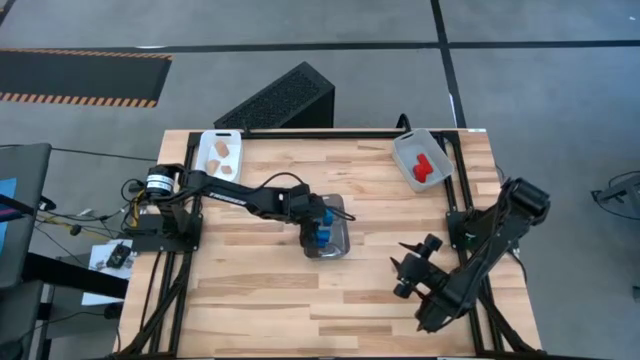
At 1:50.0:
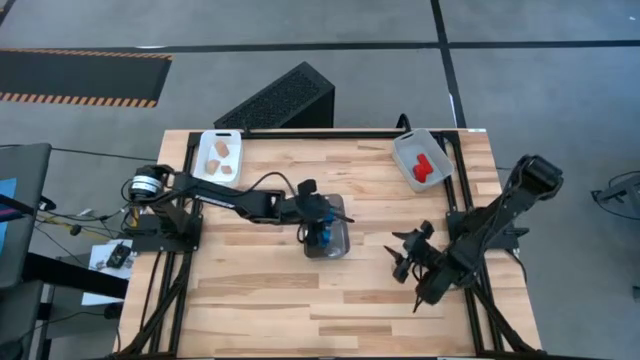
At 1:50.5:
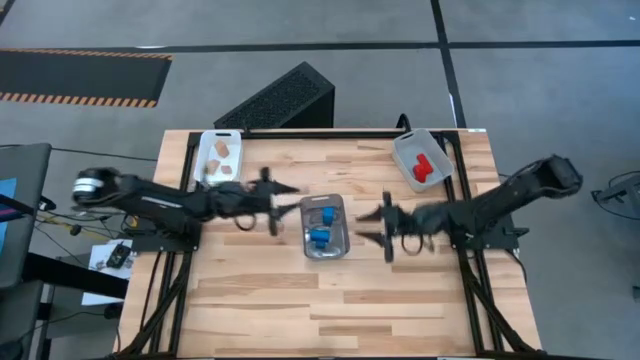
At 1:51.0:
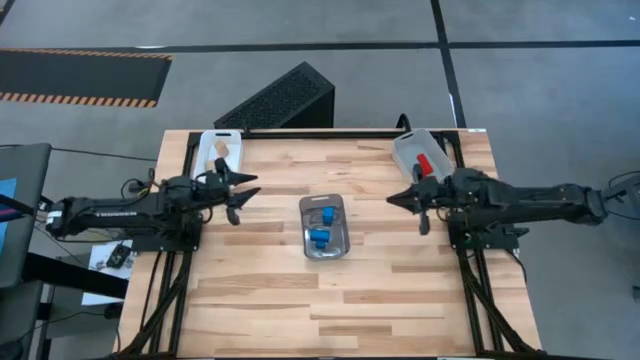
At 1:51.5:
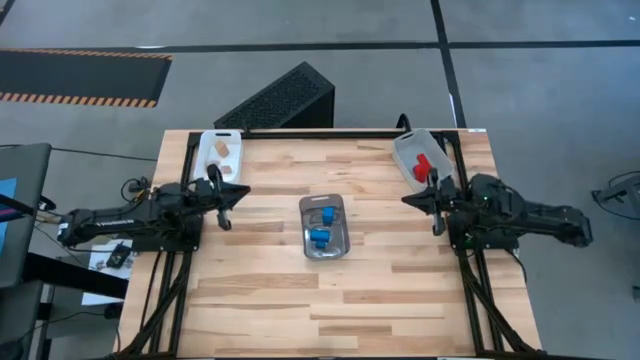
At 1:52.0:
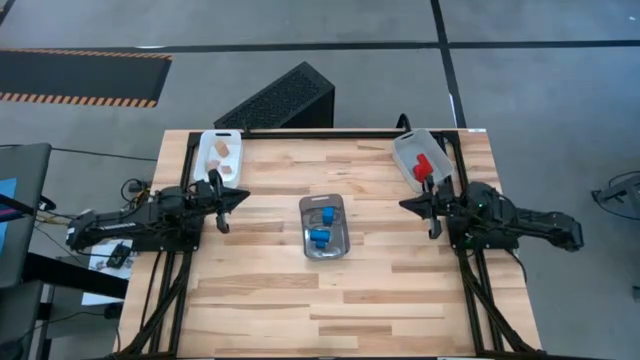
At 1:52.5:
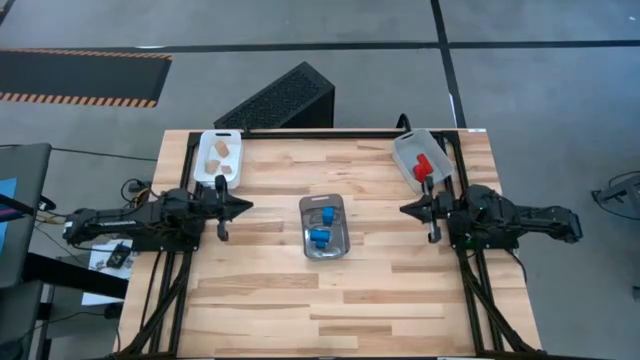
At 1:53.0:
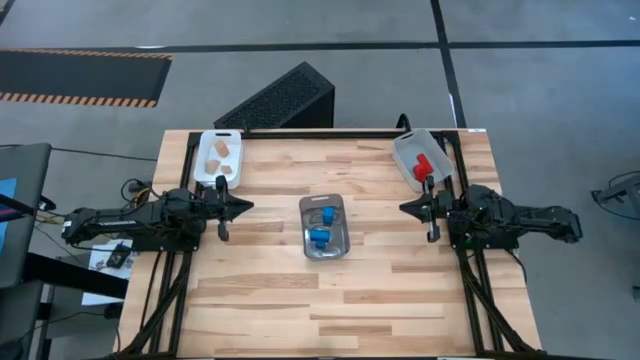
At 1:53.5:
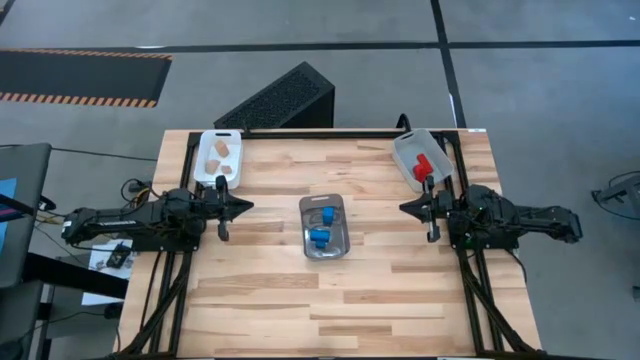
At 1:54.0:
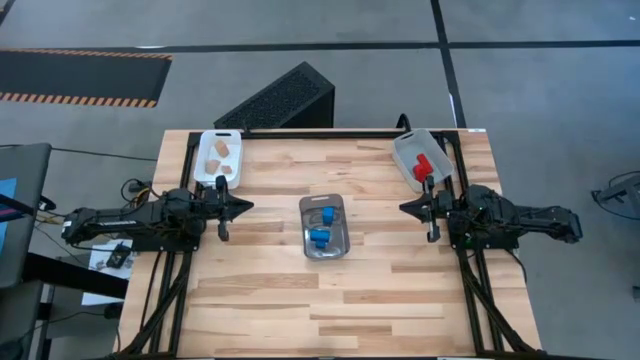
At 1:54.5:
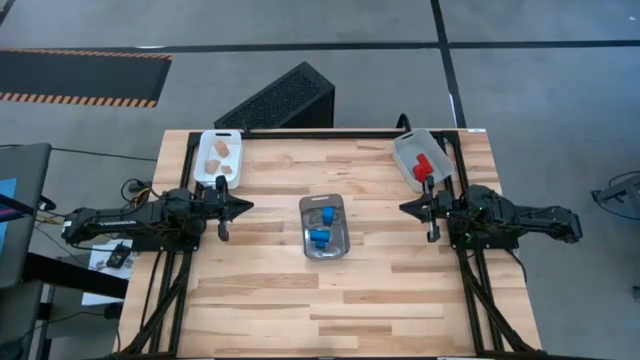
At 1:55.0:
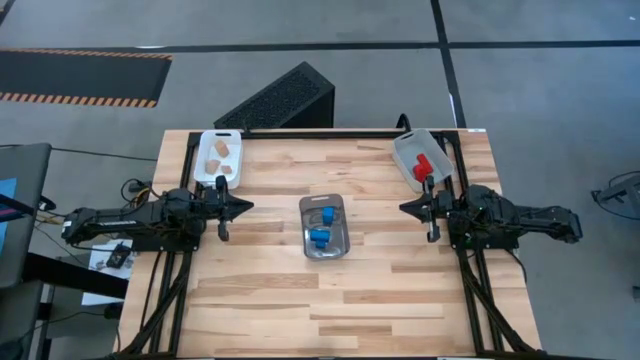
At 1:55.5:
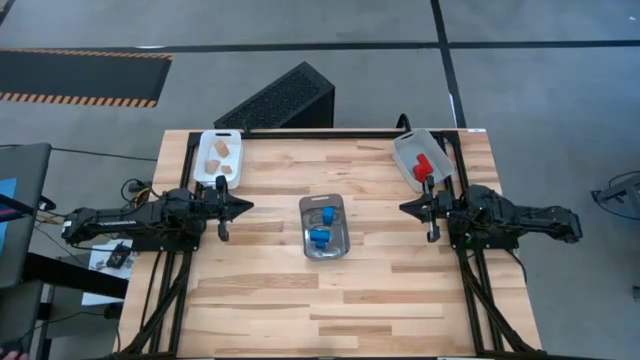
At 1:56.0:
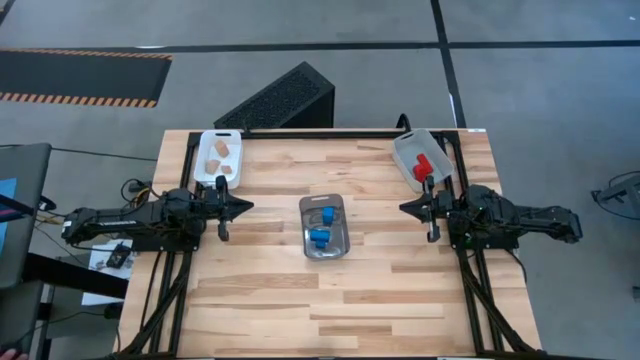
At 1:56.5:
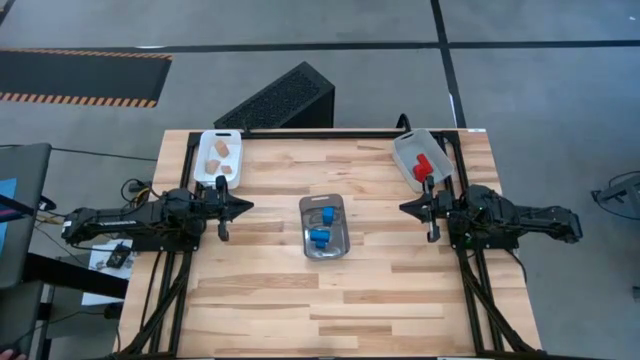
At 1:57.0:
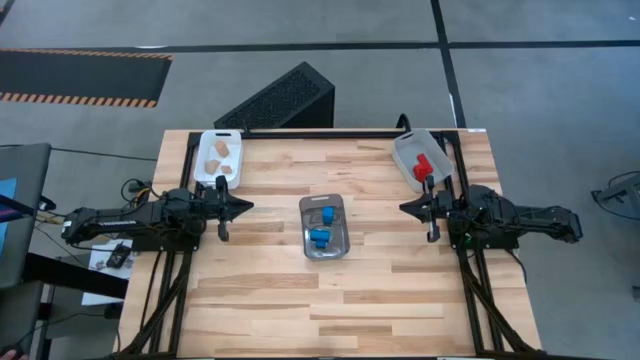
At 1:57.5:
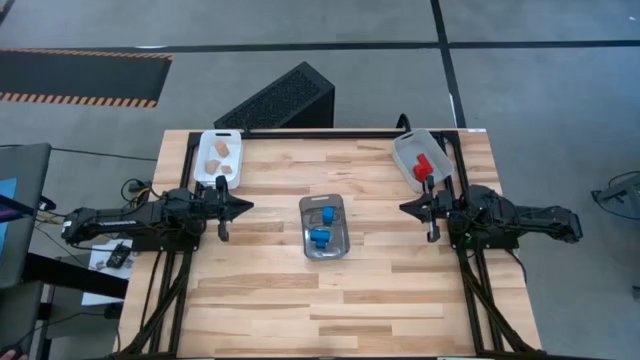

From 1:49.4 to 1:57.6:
Task: Sort & place blocks by color
Return to Home Position

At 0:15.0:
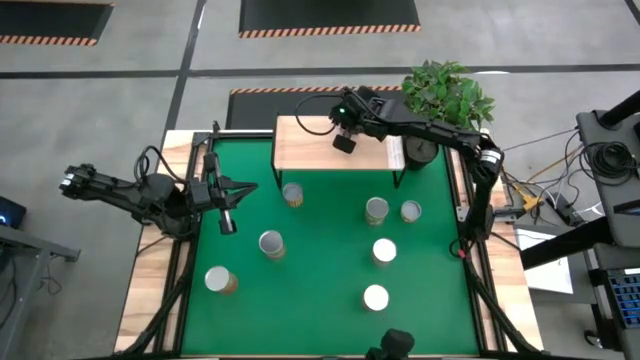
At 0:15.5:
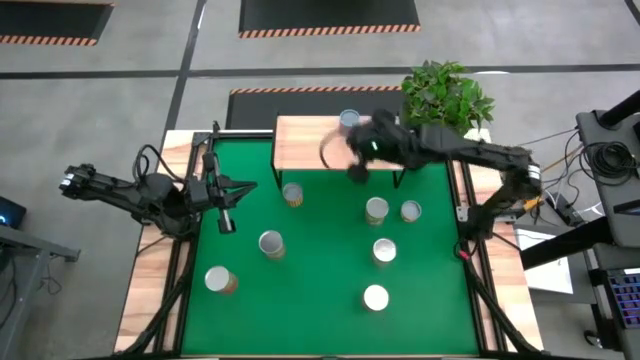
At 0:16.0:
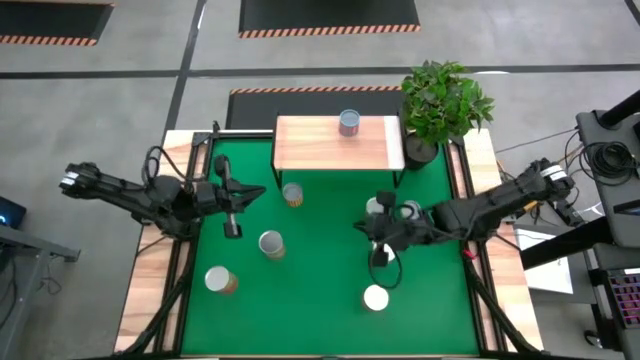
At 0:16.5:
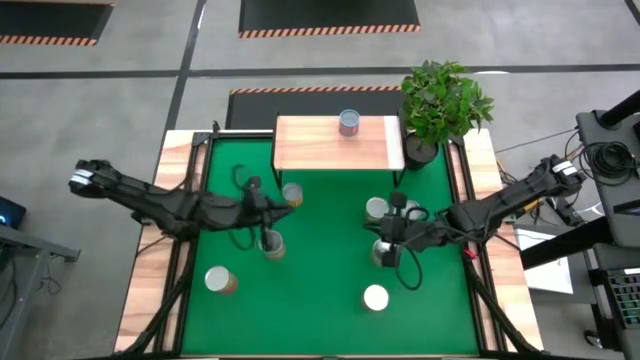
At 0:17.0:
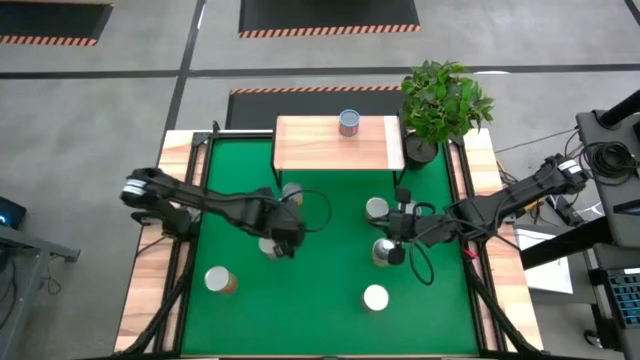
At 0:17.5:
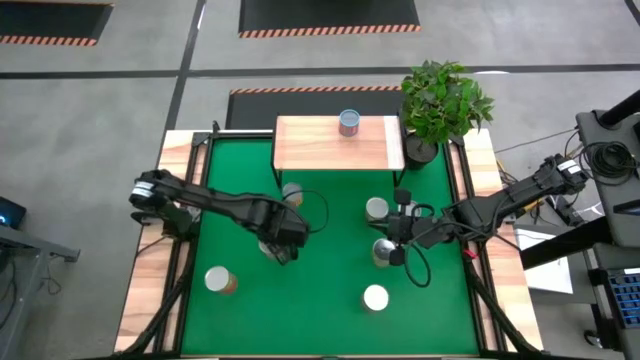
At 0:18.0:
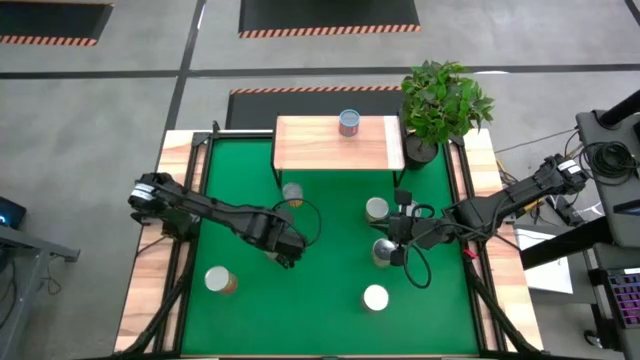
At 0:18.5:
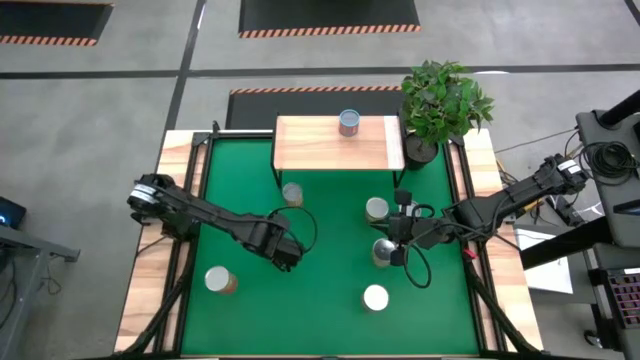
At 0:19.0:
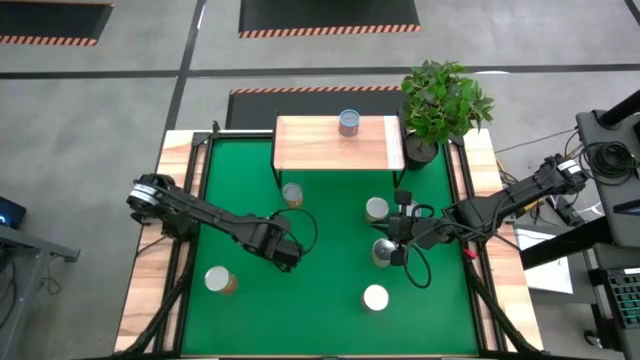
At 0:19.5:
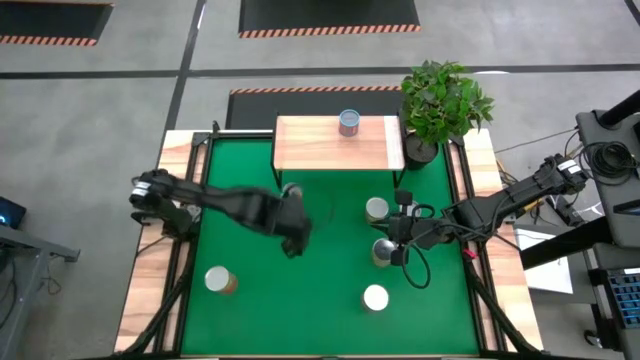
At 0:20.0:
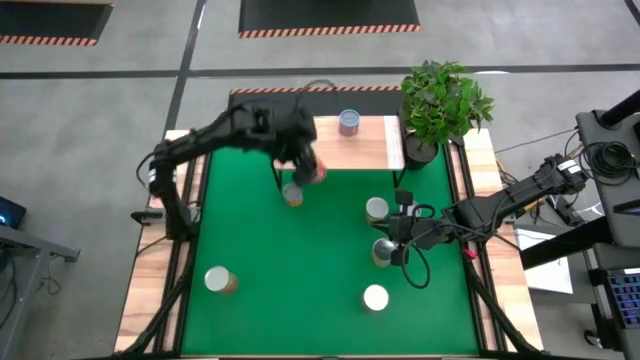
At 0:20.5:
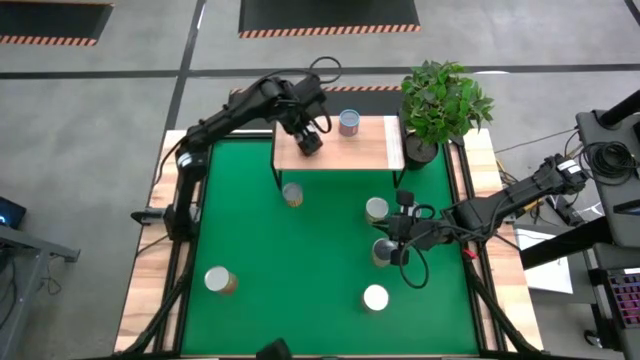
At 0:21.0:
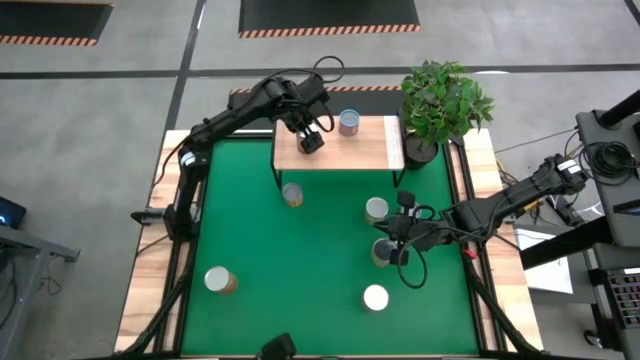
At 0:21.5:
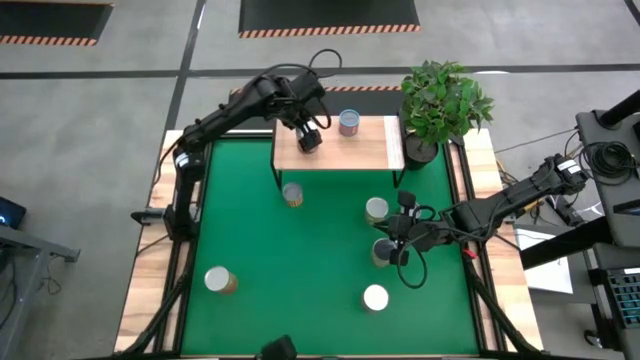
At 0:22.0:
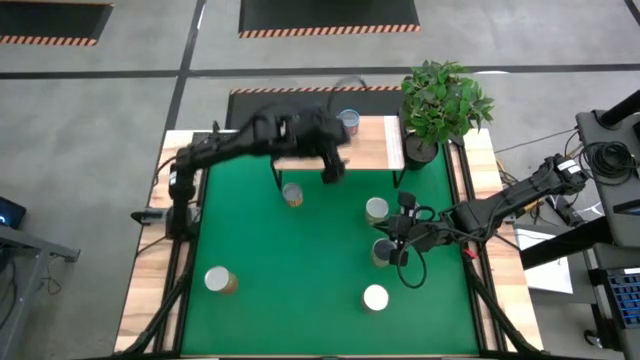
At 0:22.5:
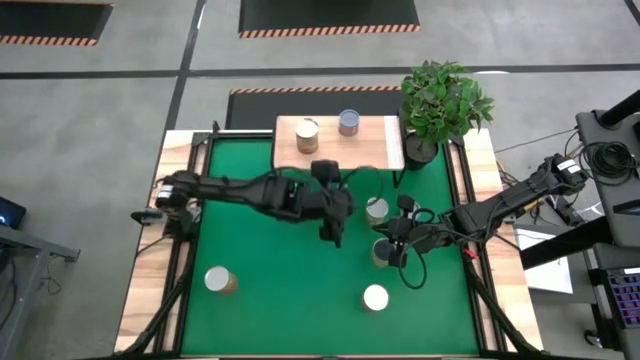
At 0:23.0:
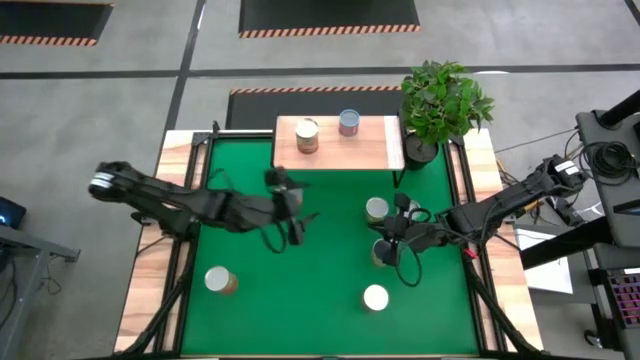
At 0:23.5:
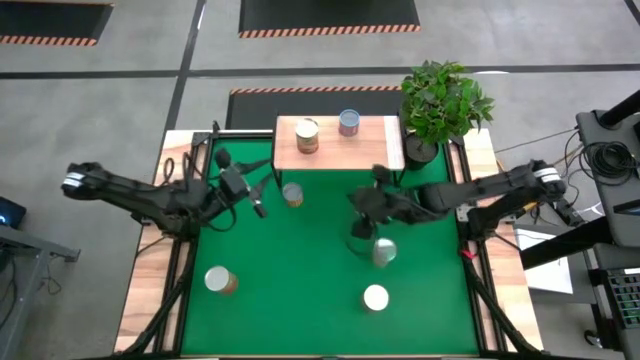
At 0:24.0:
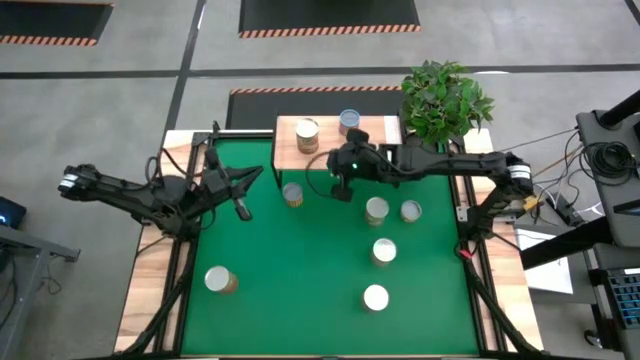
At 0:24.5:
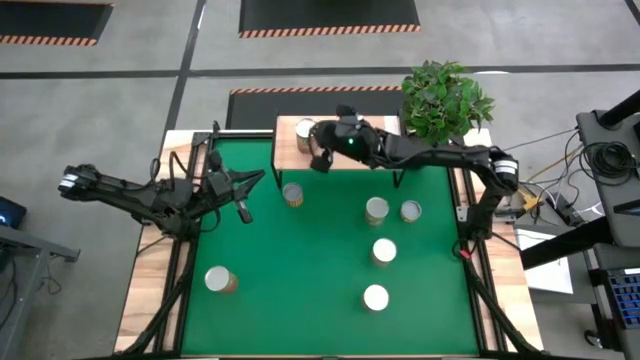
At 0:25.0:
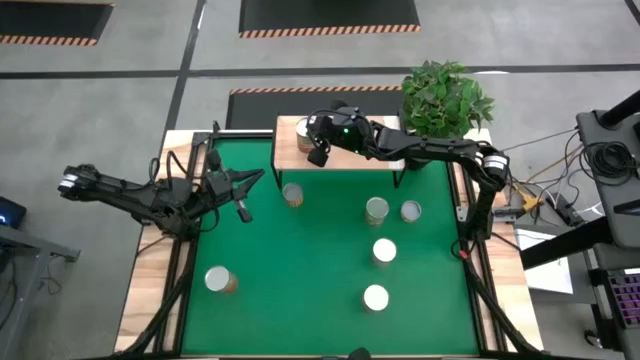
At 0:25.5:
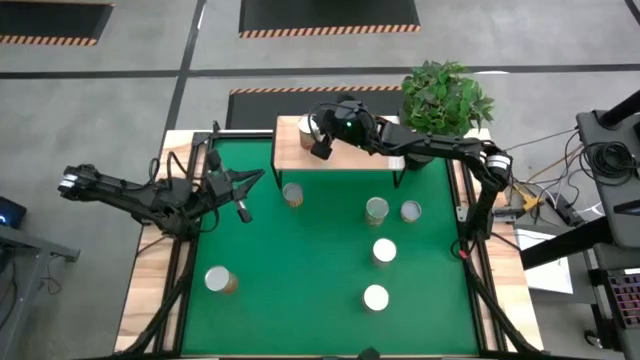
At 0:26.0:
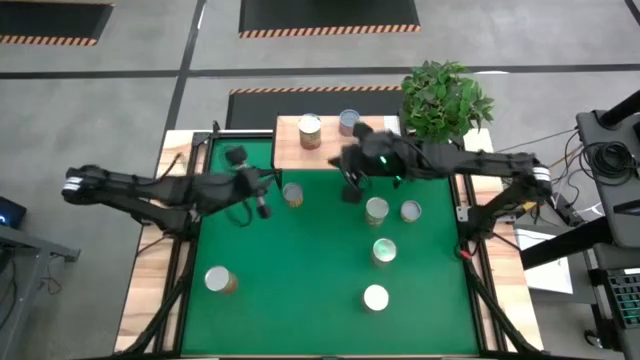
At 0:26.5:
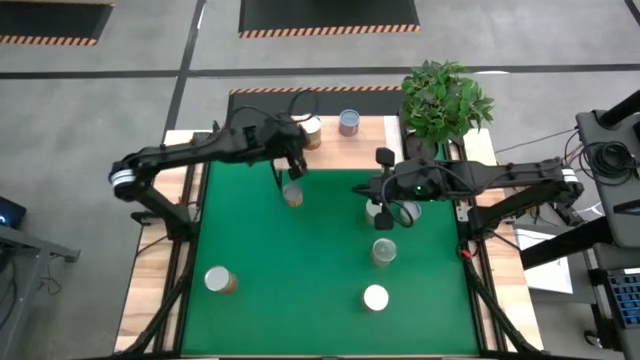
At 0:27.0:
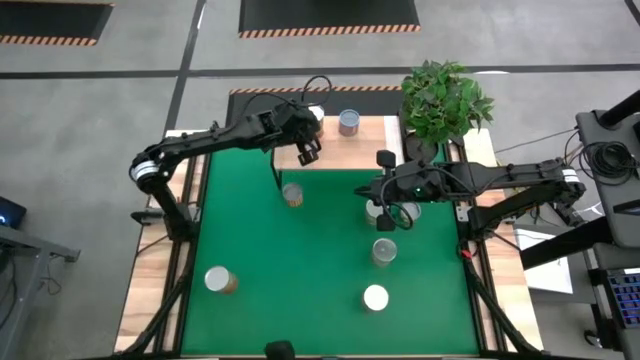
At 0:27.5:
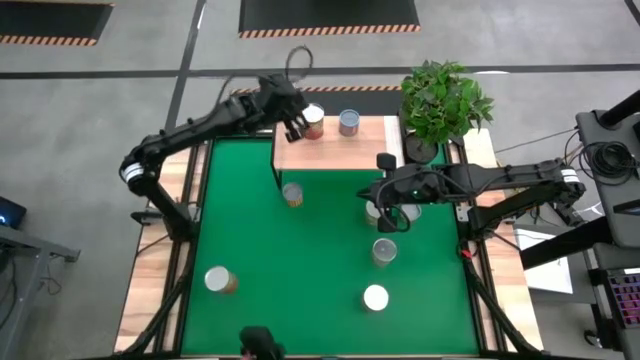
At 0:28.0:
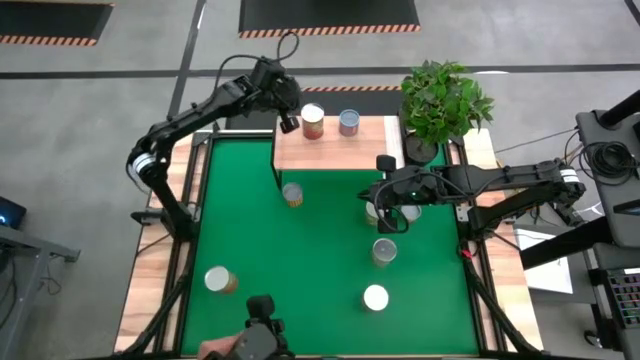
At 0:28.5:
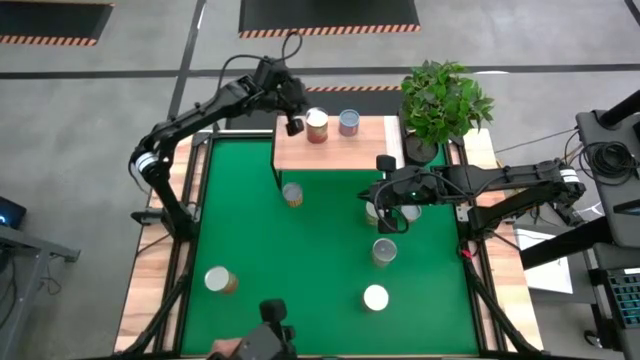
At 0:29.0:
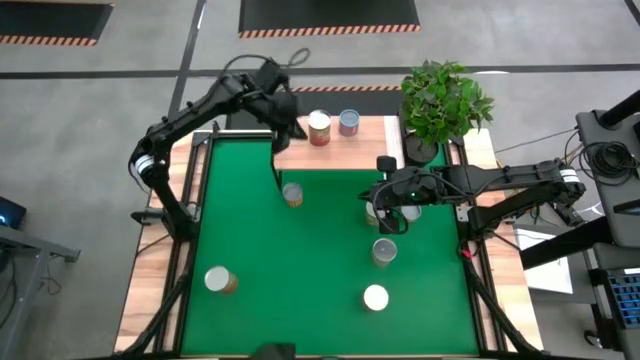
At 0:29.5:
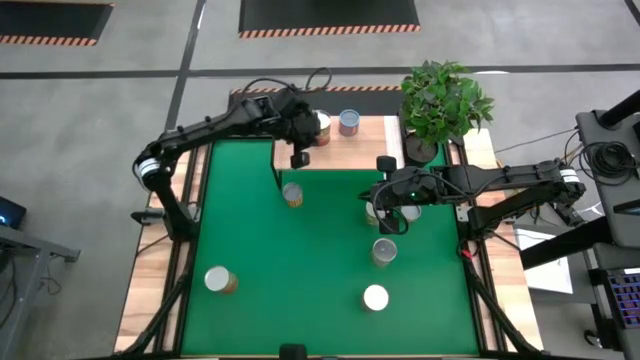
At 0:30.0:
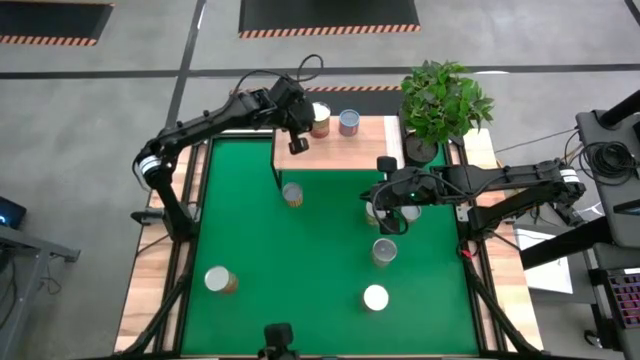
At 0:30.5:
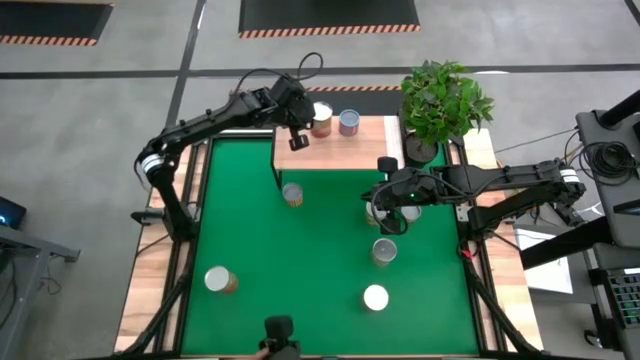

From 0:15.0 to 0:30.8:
Task: Pick and place cans onto a shelf
Put the left big canned corn on the shelf
